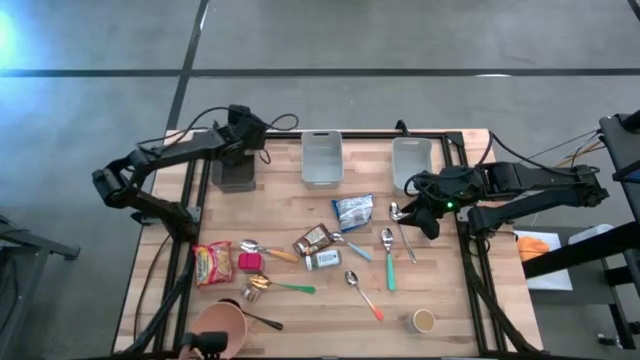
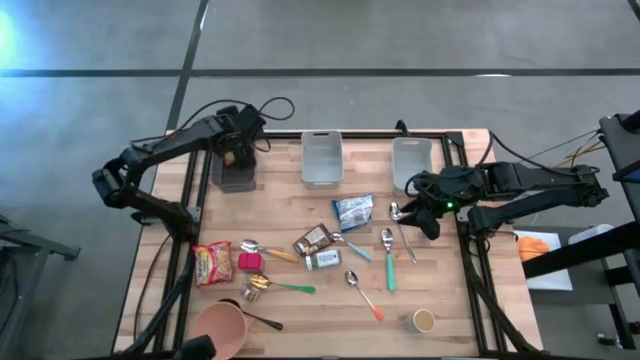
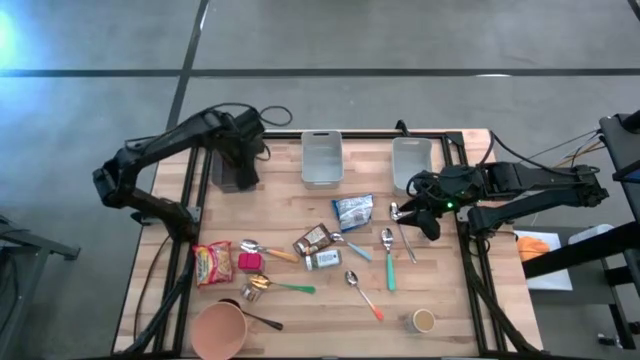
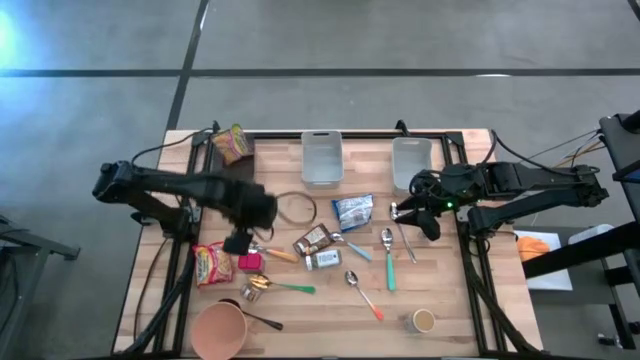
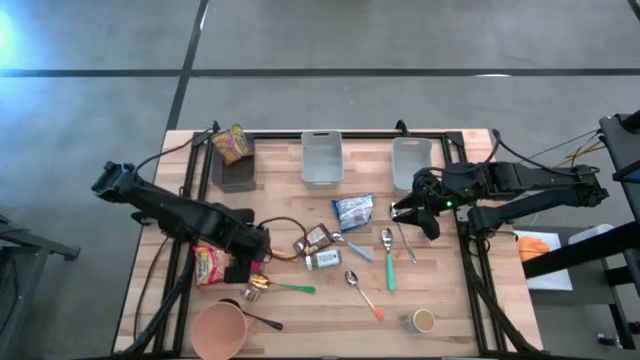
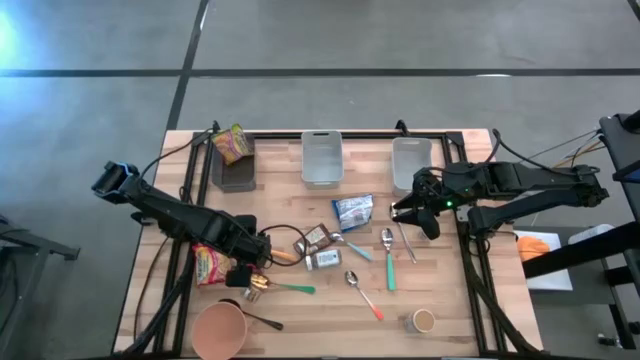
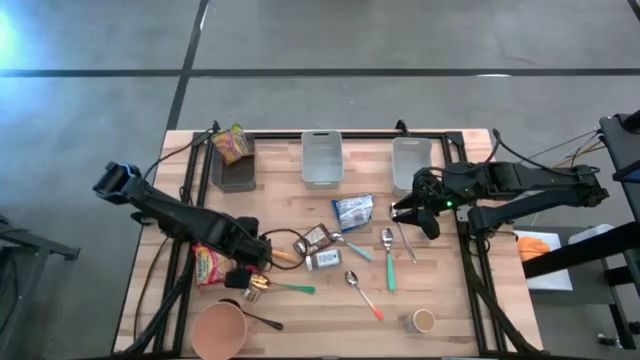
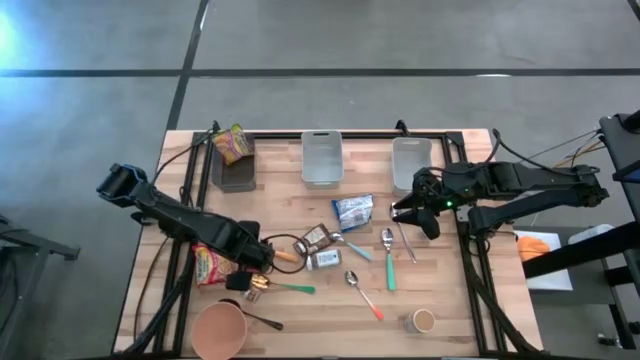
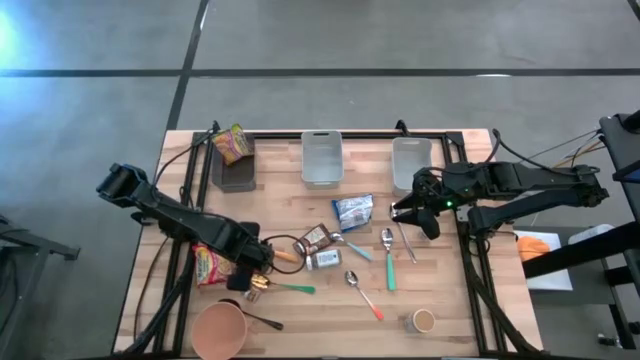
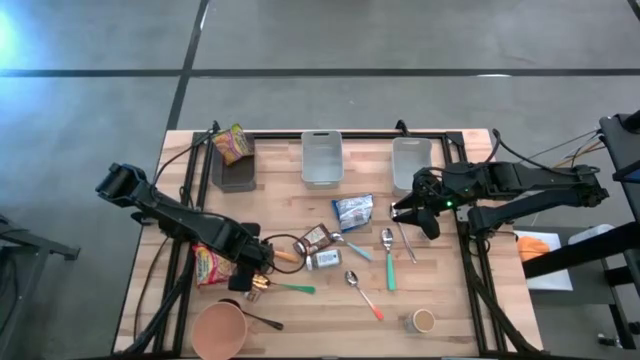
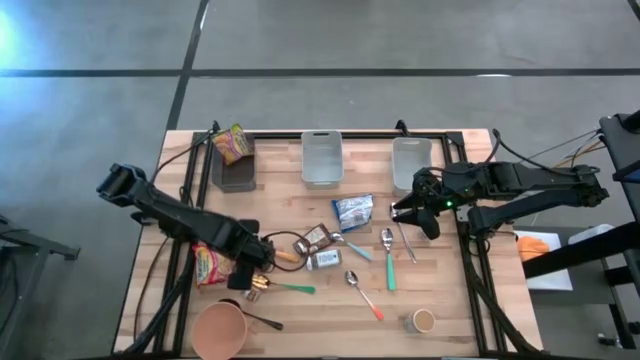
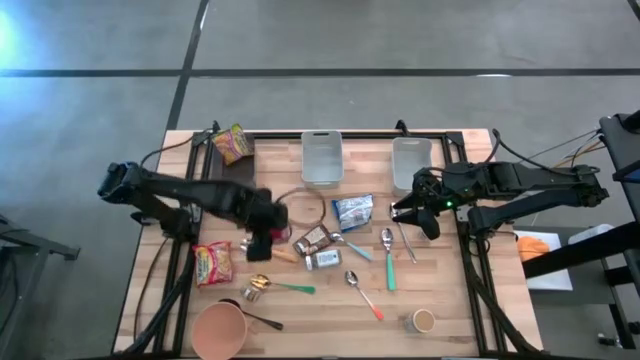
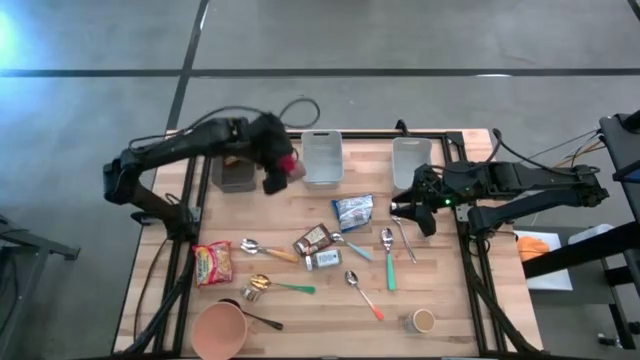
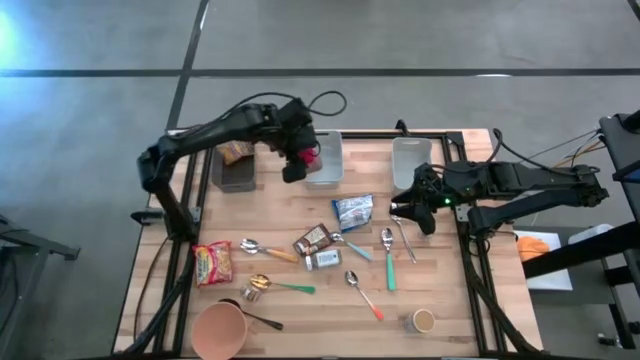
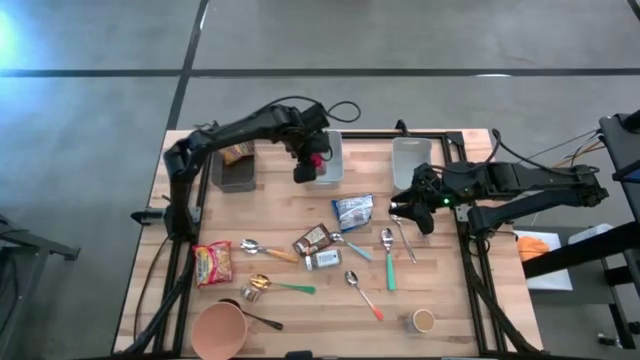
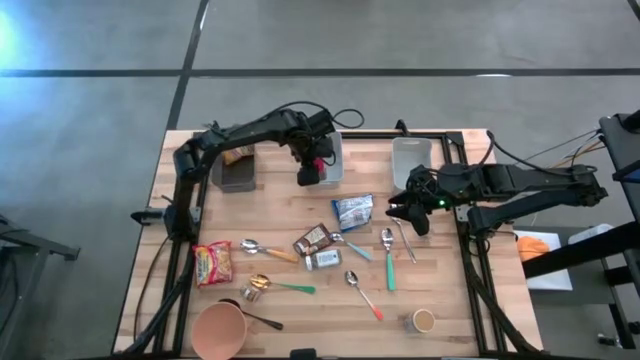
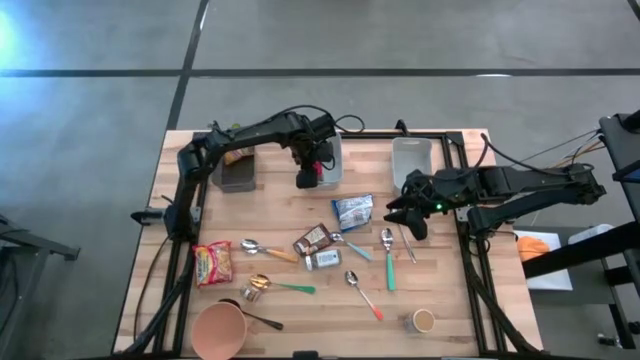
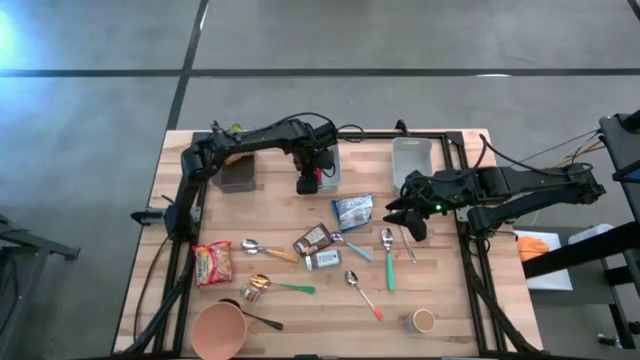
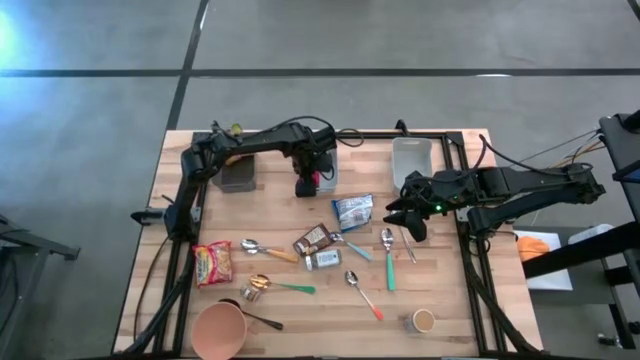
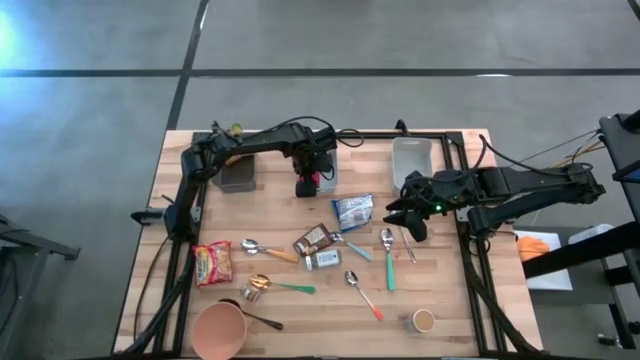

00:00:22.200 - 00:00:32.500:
Put the red seasoning can into the left gray bin

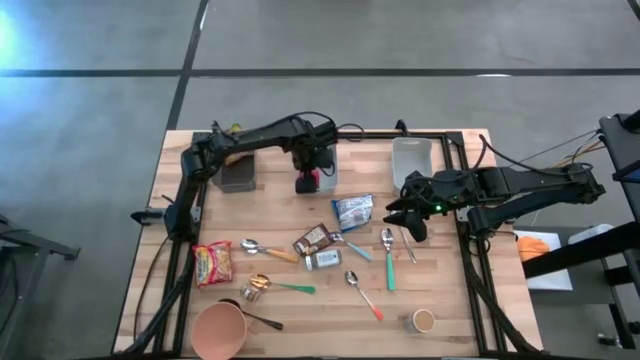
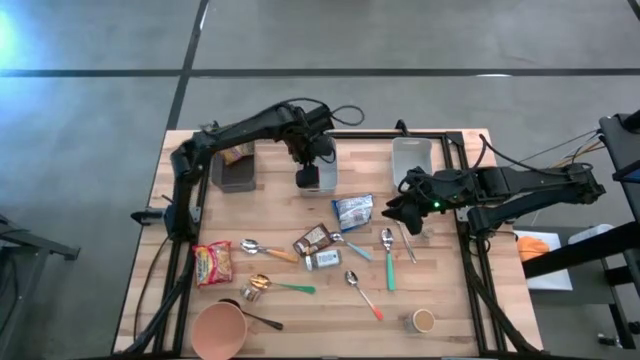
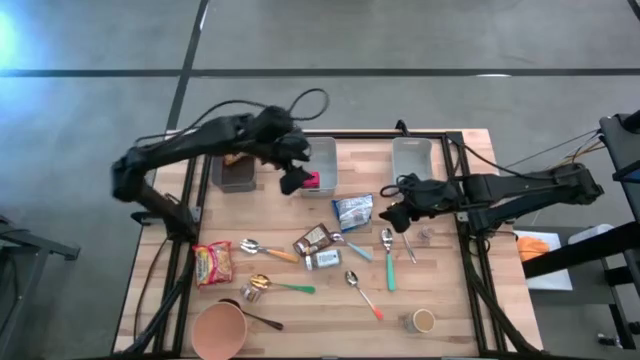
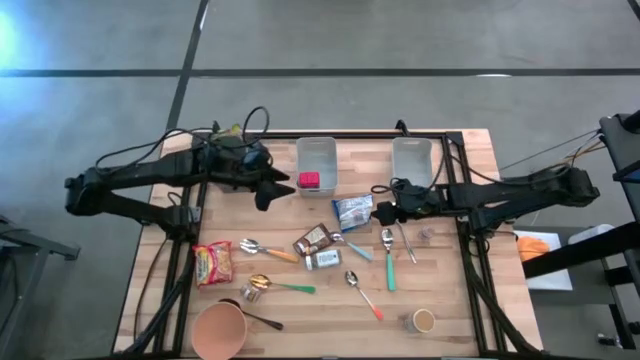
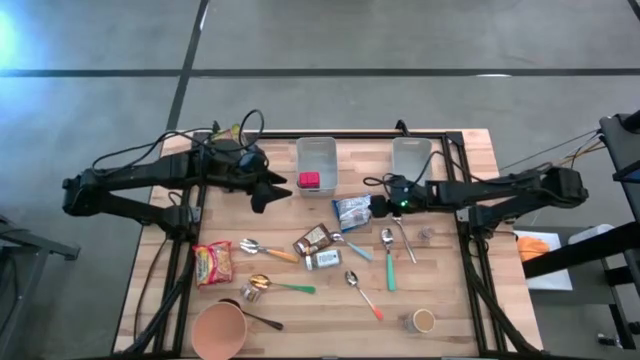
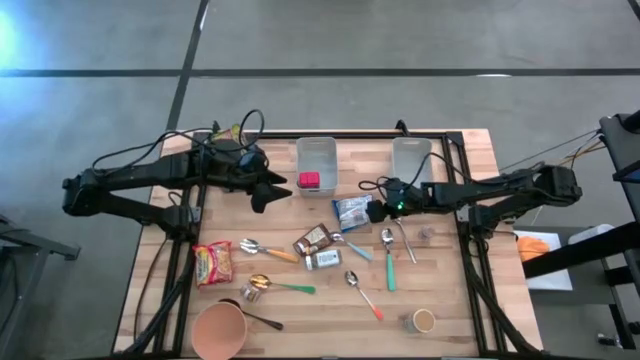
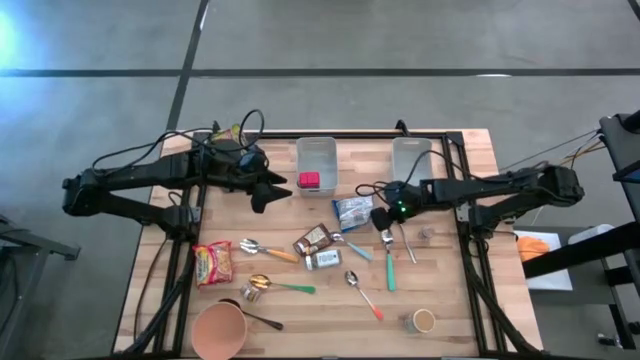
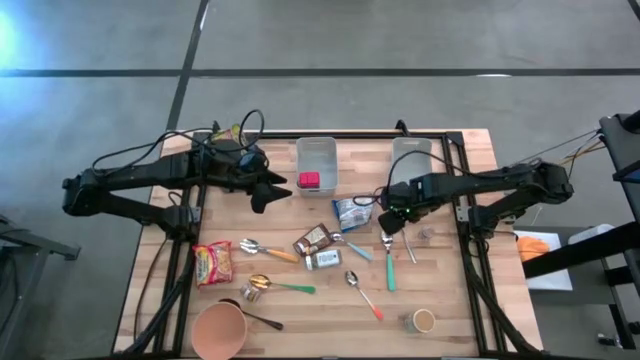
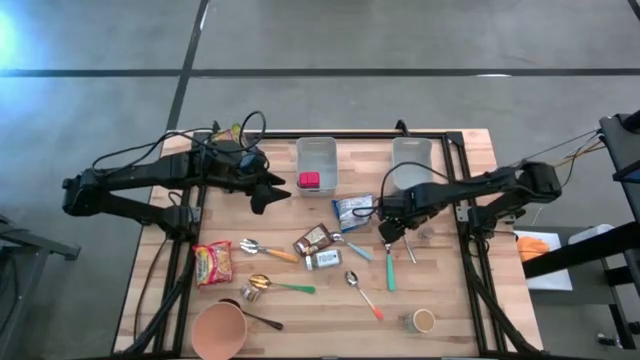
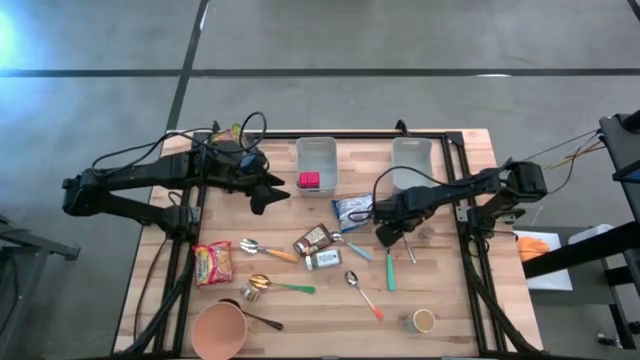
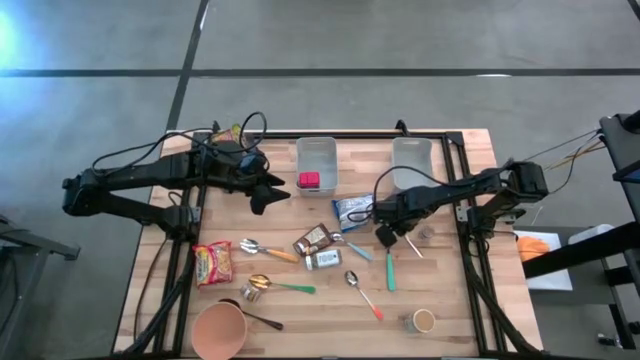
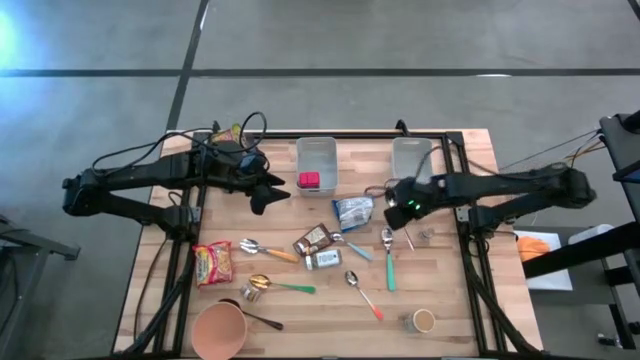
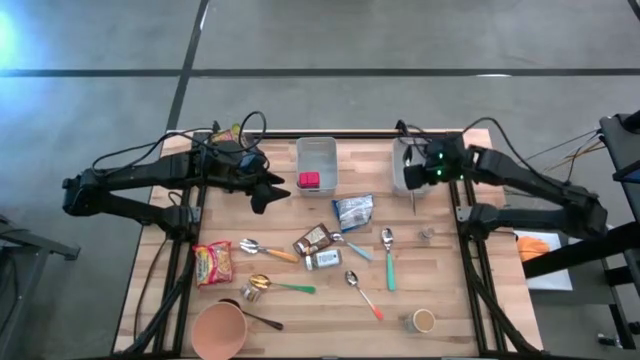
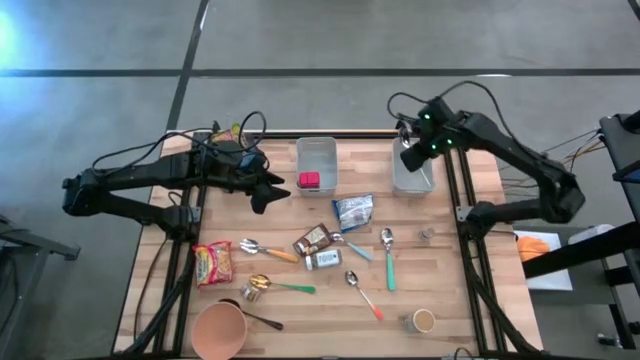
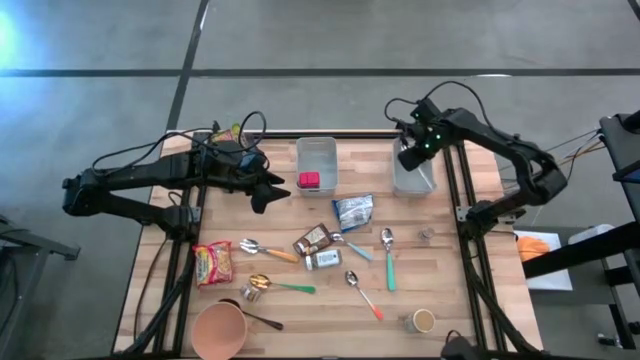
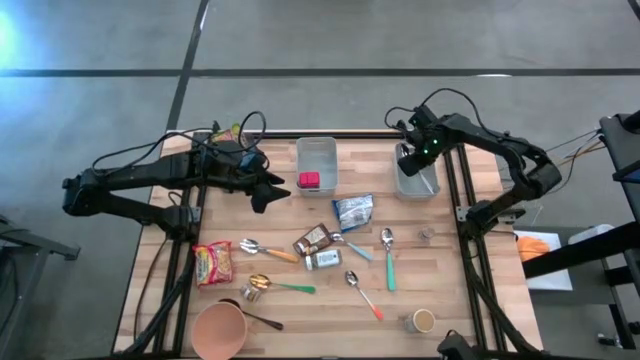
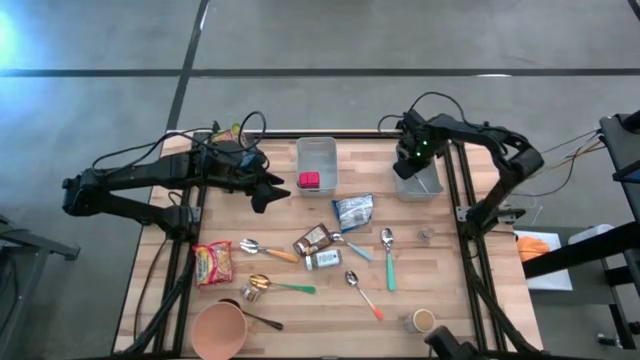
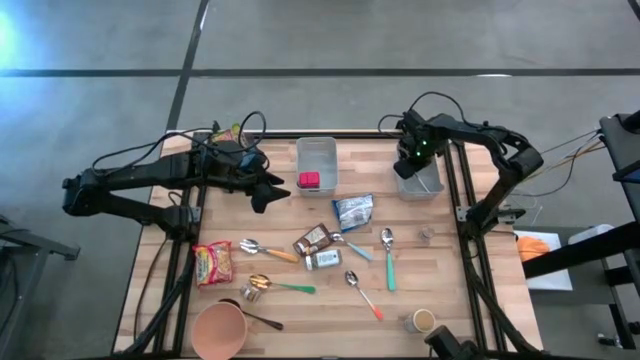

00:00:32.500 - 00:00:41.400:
Put the silver spoon into the right gray bin
